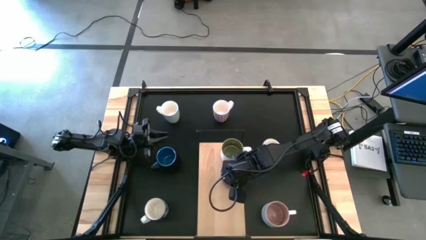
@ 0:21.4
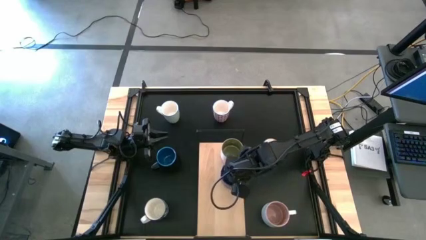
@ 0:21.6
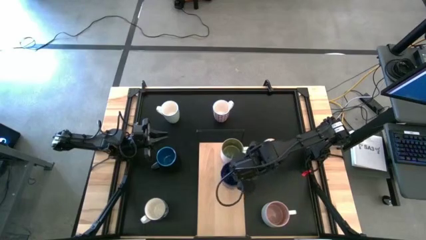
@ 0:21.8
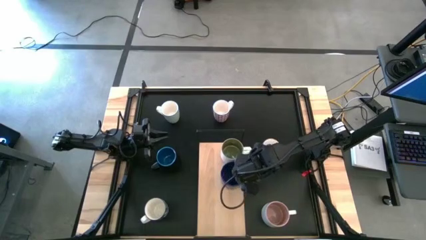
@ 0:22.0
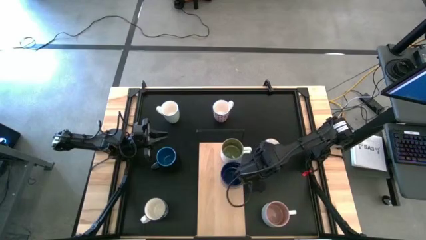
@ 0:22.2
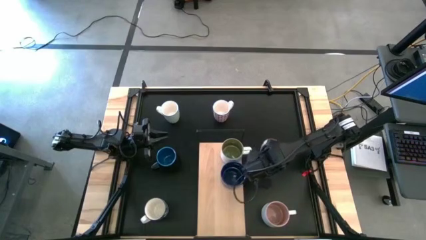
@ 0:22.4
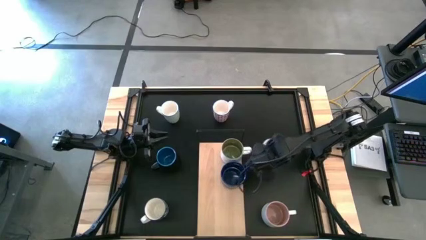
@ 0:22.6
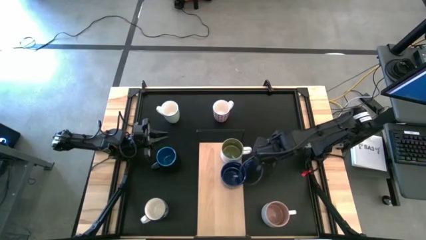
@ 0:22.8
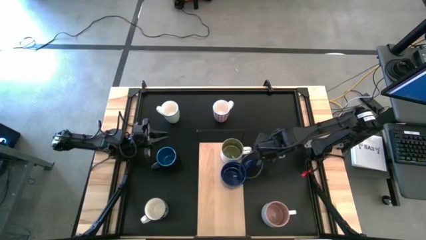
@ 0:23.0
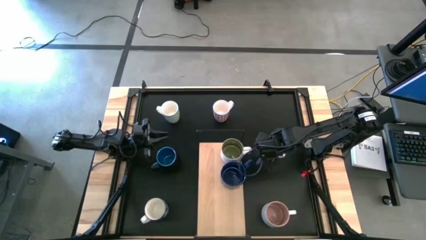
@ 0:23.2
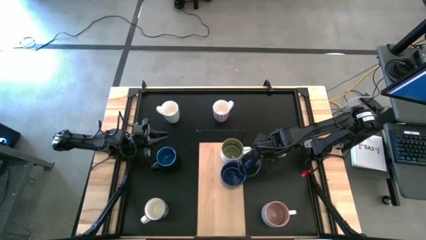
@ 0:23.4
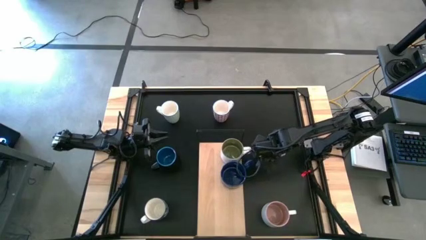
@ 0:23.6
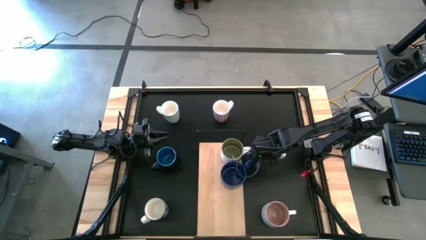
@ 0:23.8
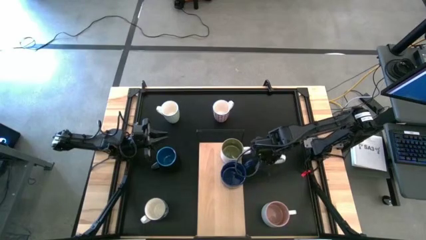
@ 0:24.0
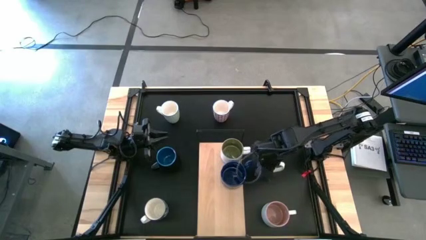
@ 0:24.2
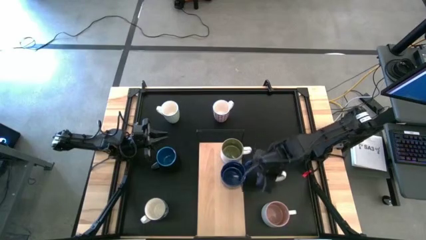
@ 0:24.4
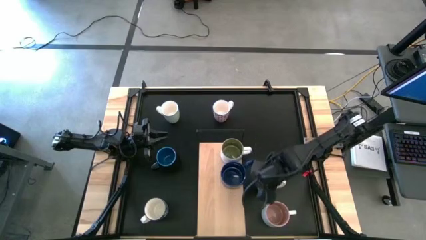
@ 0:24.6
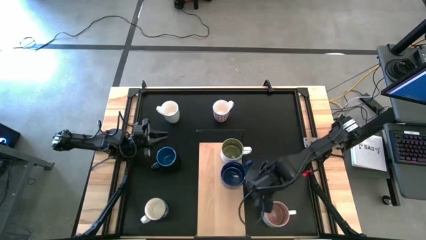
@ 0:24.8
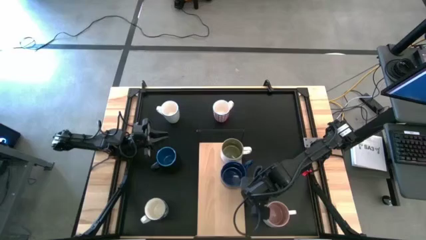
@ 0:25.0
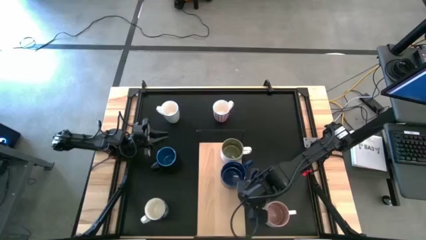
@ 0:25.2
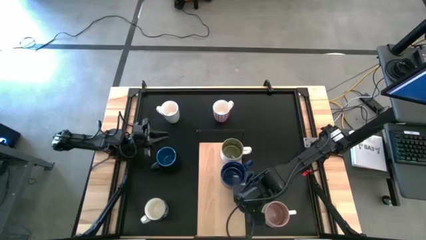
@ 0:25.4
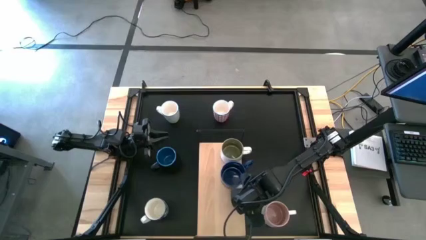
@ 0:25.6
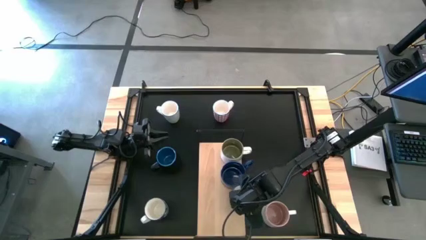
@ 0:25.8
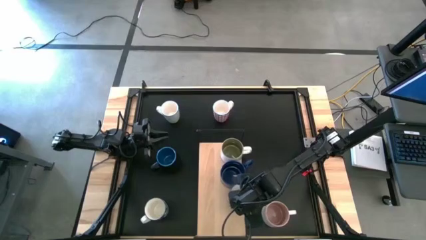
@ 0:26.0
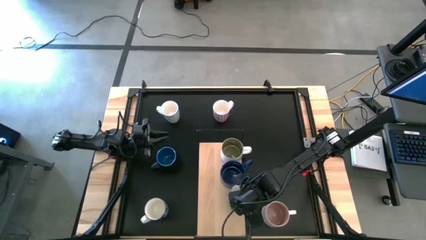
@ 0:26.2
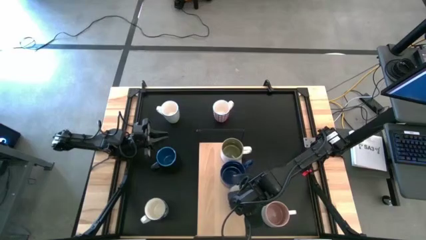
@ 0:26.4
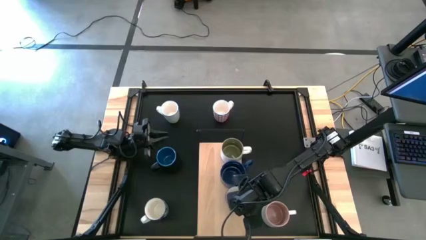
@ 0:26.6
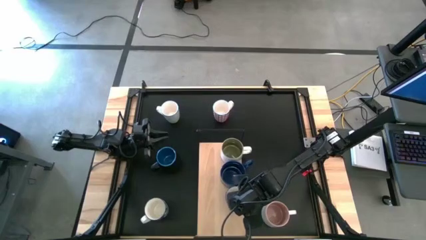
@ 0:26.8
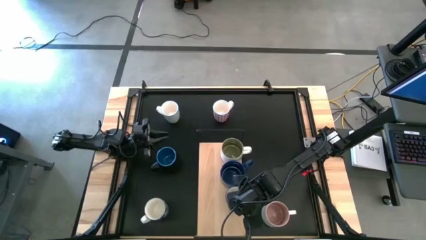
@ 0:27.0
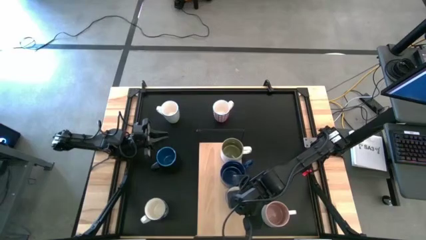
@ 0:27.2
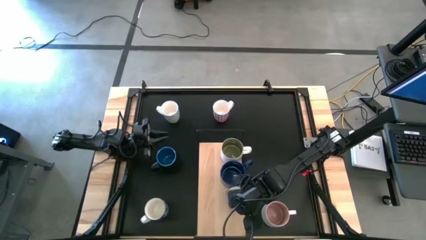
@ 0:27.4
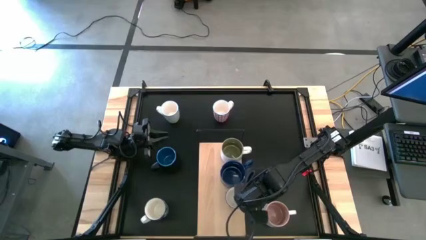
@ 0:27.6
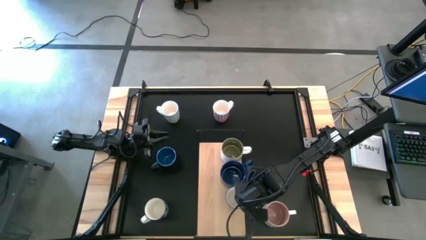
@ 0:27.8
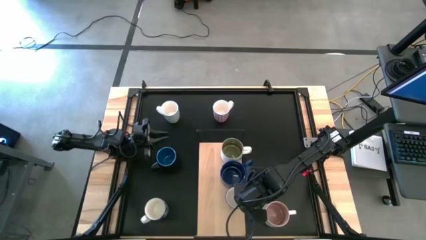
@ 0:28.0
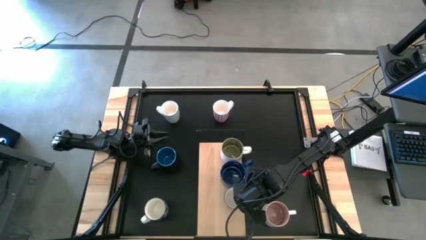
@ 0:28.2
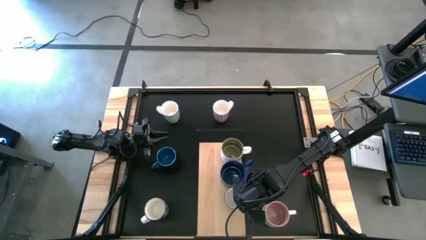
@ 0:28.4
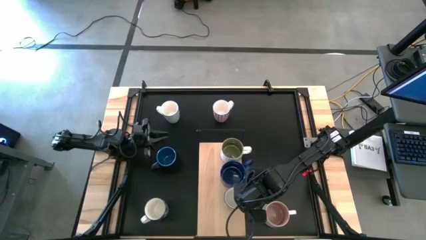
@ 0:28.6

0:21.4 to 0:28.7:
Task: Place coffee mugs
Put the right blue patterned mug on the shelf

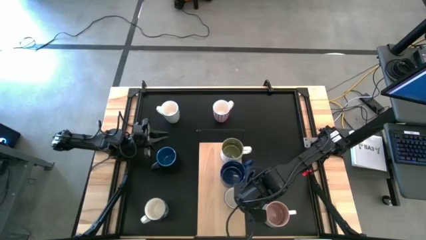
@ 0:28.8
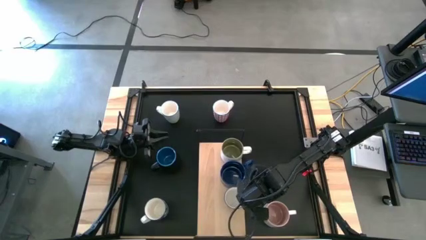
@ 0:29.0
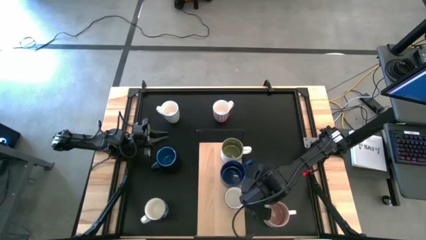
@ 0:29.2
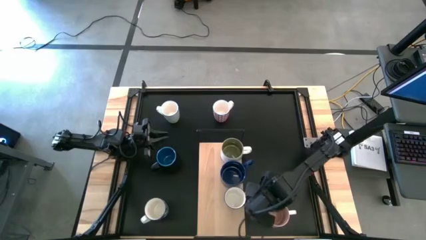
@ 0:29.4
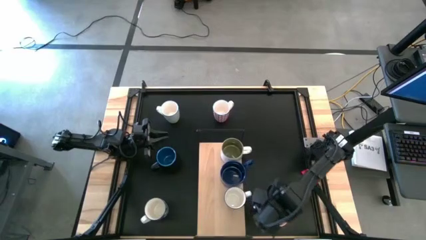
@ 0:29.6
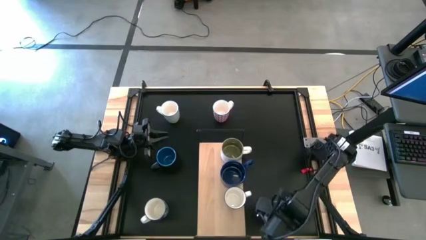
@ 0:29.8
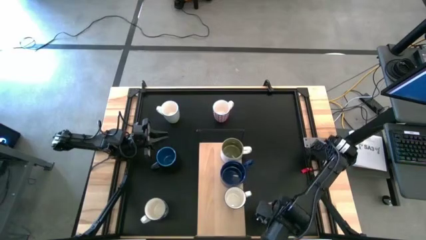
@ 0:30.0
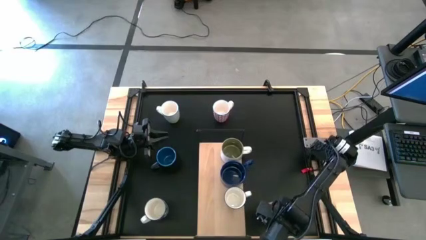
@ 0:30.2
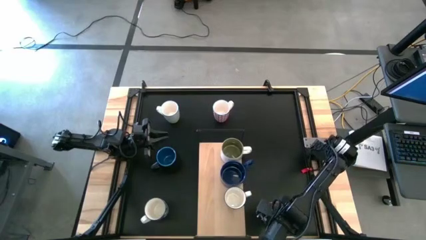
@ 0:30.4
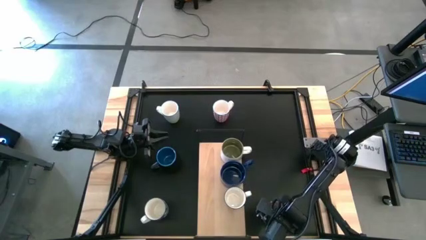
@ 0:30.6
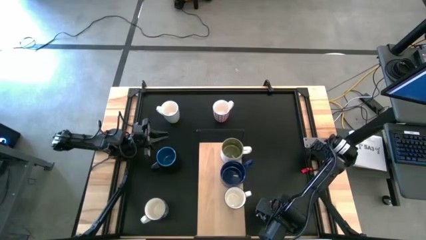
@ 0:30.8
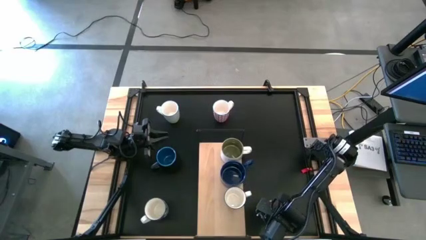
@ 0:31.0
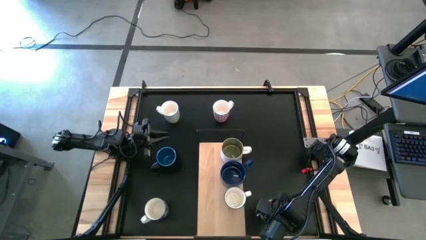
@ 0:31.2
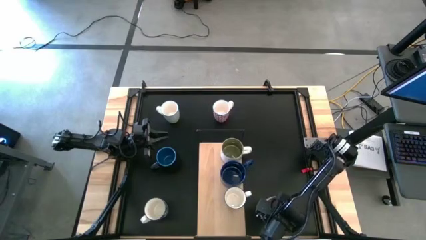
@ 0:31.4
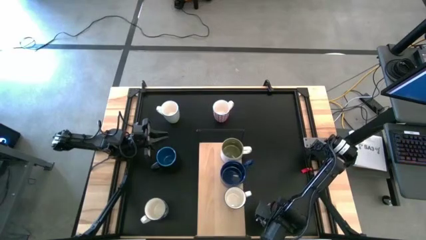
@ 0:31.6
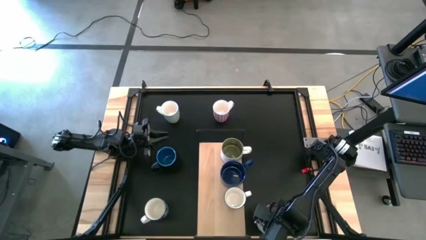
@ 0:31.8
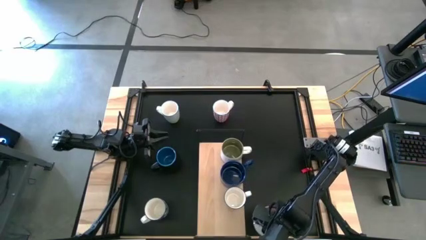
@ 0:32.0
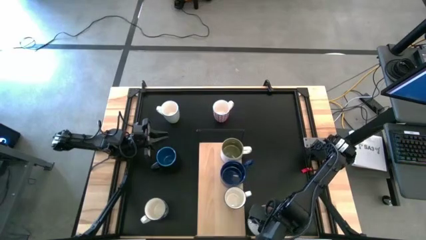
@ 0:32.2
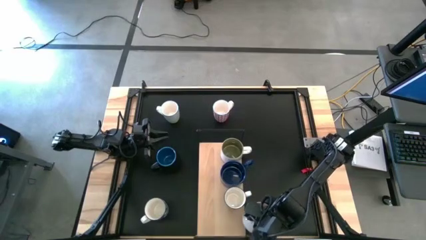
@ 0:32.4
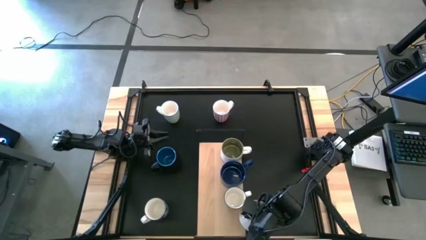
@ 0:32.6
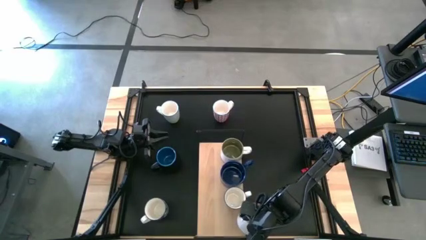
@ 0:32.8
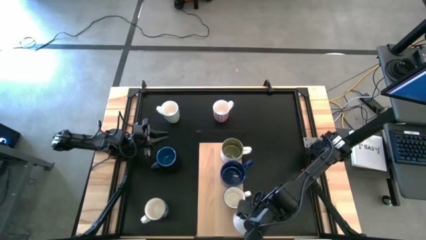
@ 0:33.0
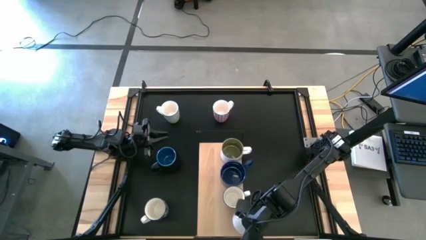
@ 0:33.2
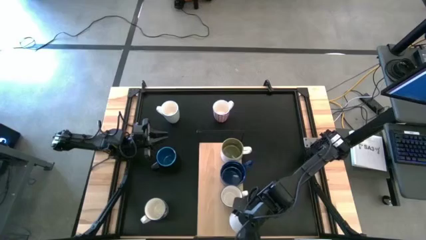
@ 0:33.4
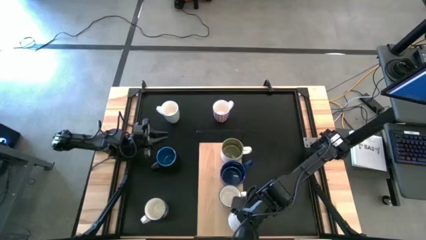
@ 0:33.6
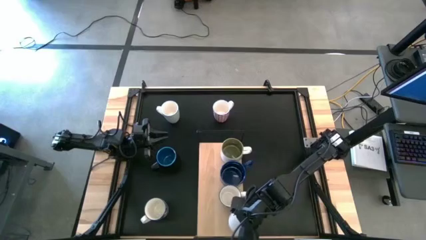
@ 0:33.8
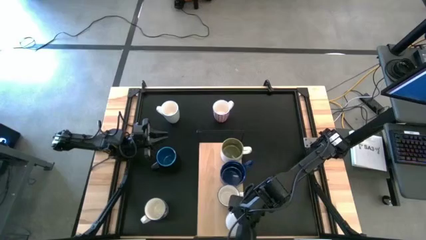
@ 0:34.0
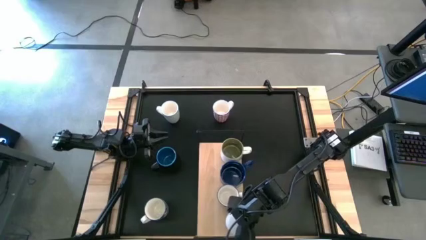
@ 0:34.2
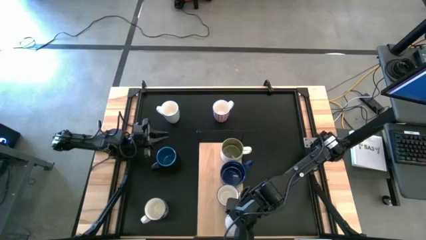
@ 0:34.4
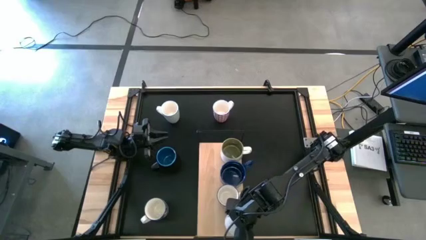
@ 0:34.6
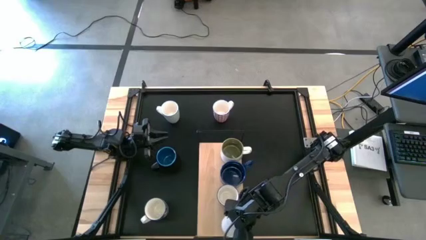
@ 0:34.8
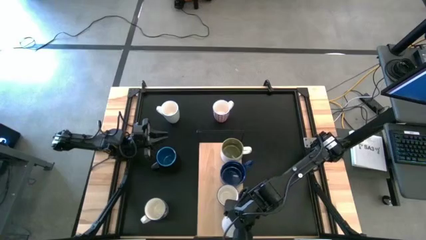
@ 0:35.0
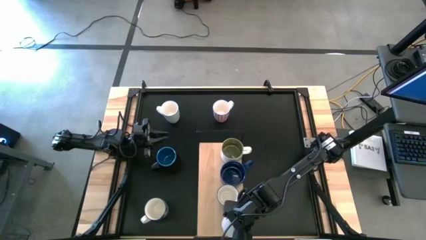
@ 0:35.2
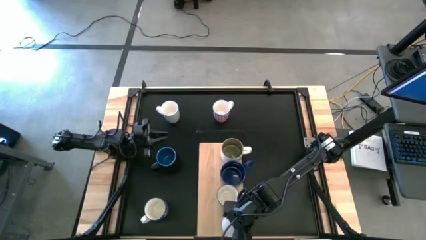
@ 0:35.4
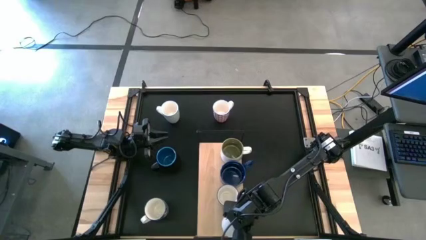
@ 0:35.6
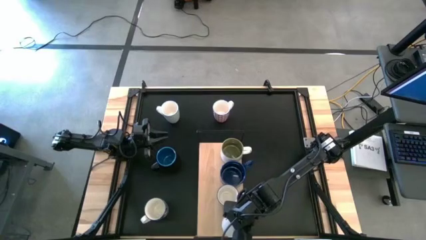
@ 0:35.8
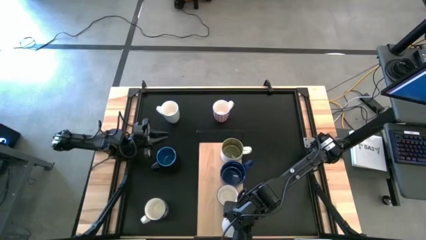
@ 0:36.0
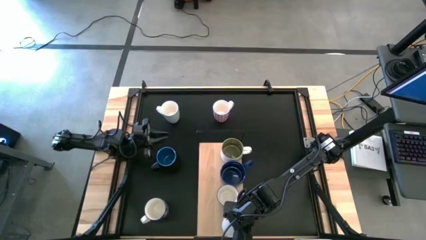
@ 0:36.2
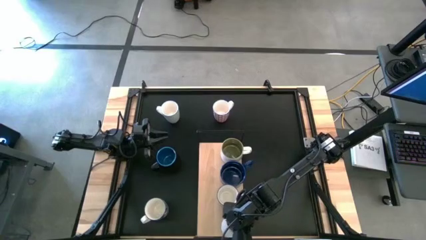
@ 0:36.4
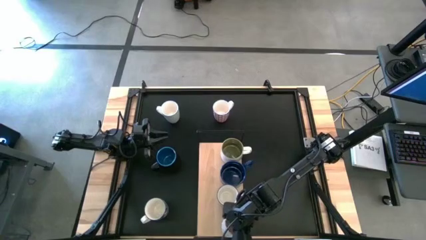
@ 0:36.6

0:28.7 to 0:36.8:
Put the light orange mug on the shelf
